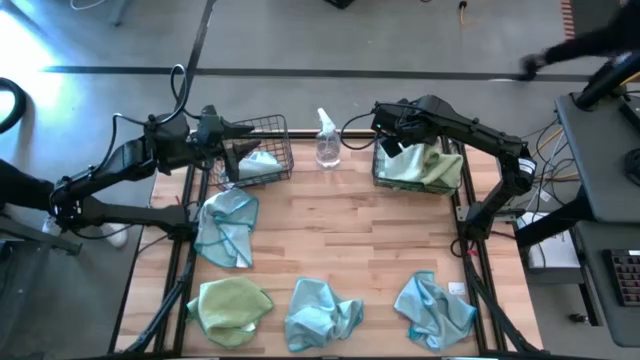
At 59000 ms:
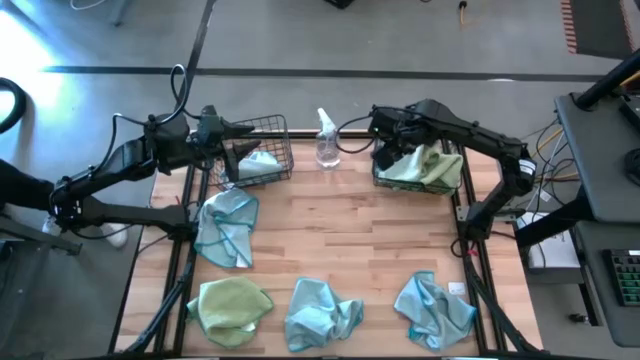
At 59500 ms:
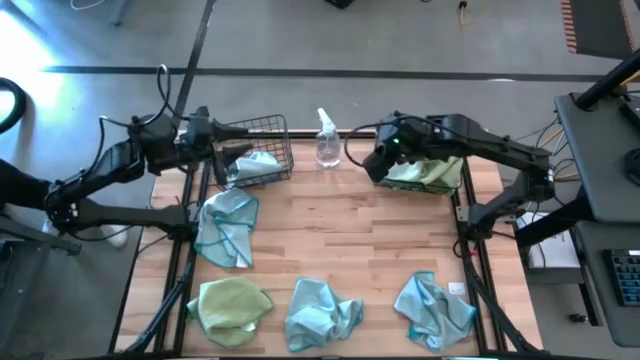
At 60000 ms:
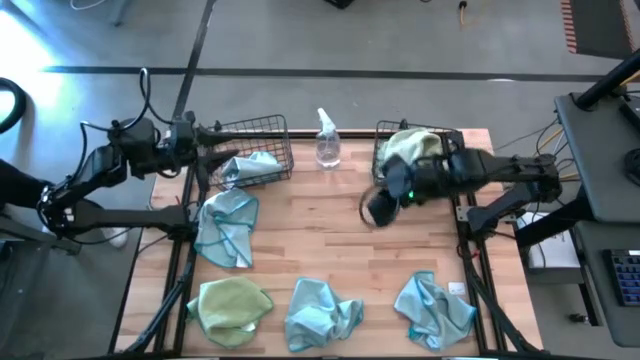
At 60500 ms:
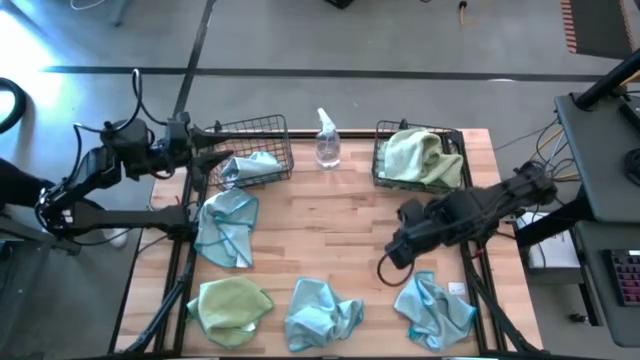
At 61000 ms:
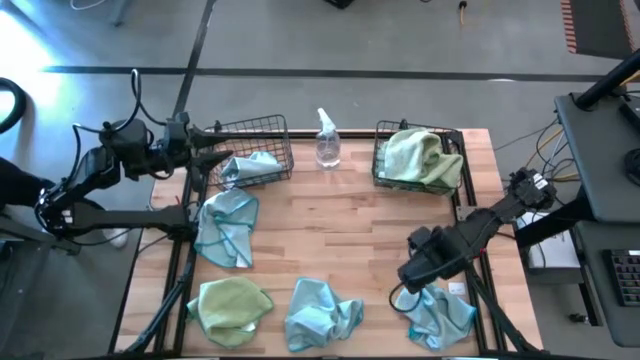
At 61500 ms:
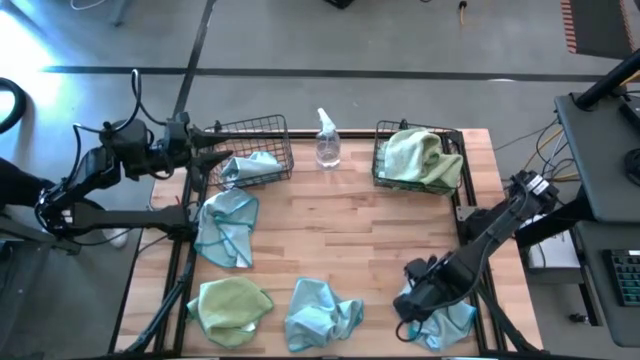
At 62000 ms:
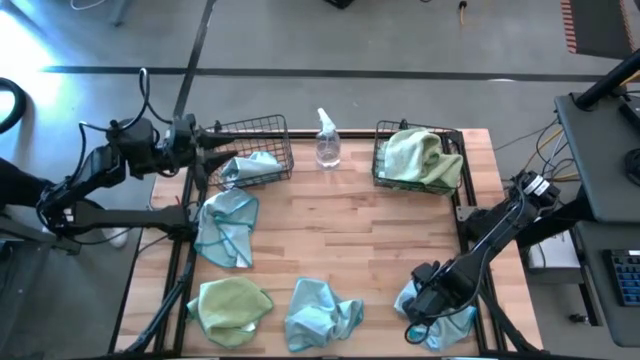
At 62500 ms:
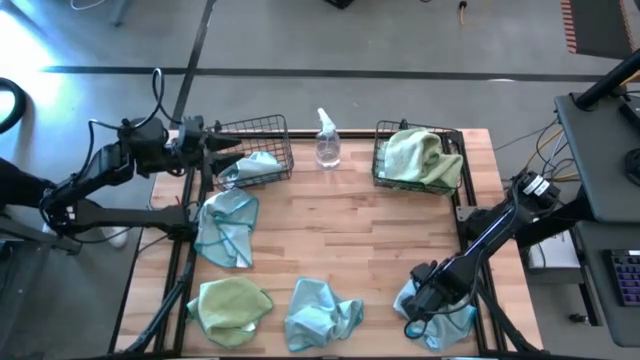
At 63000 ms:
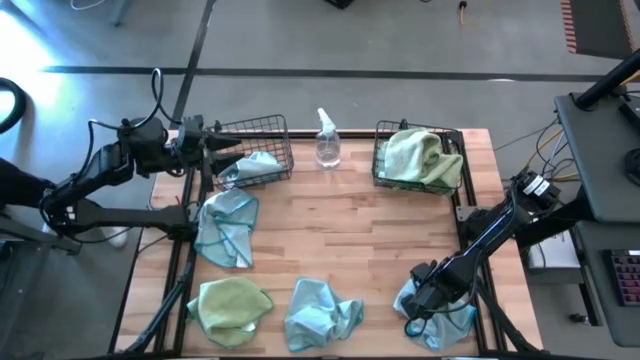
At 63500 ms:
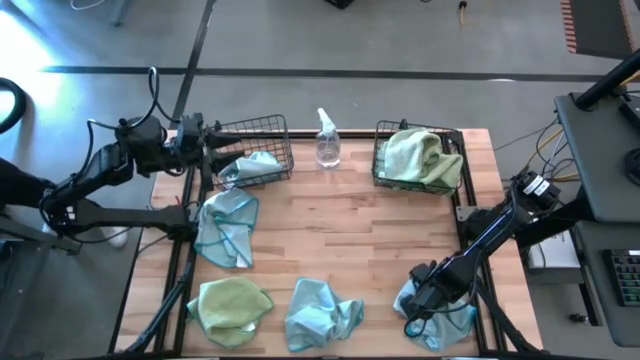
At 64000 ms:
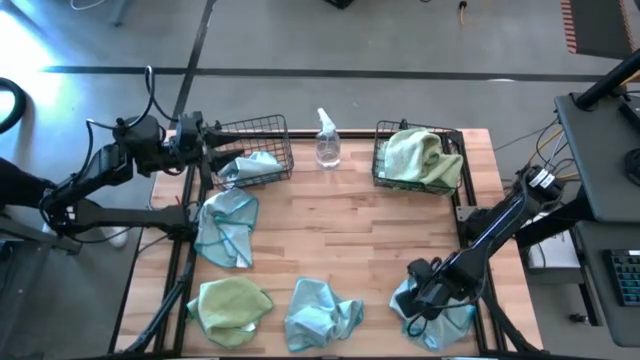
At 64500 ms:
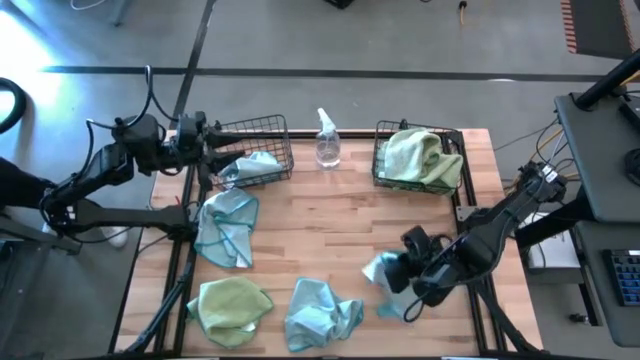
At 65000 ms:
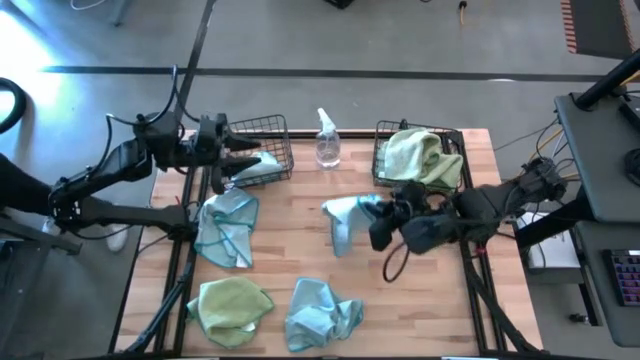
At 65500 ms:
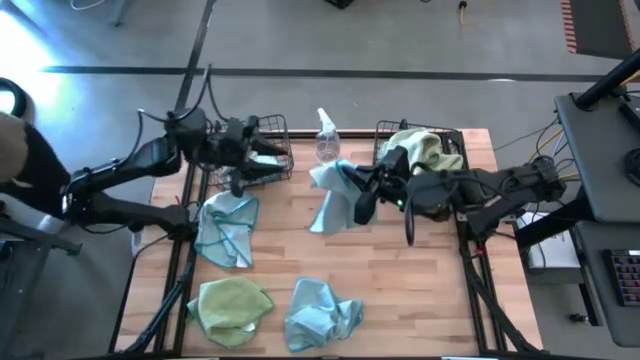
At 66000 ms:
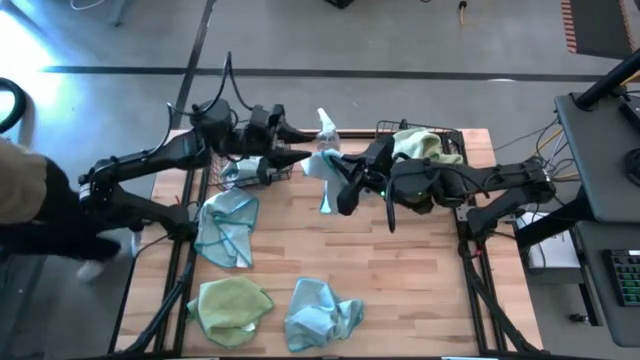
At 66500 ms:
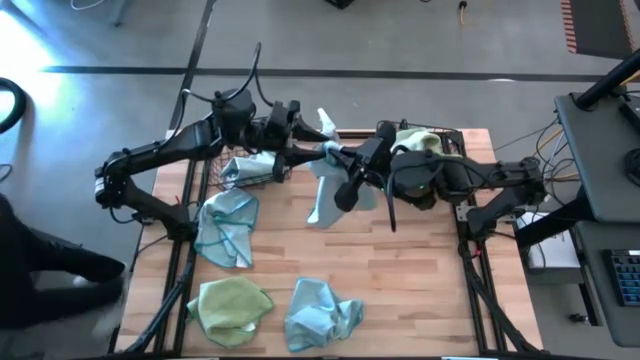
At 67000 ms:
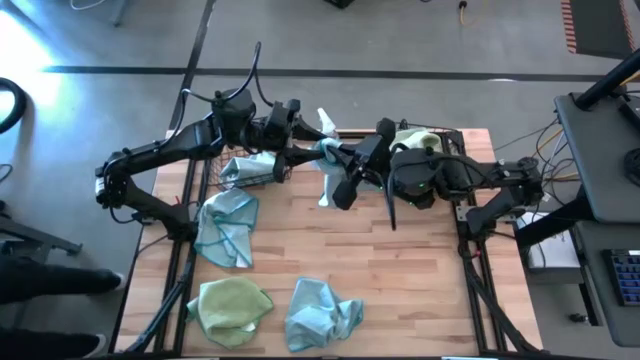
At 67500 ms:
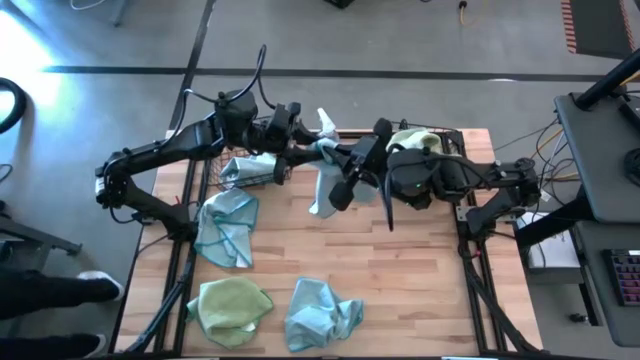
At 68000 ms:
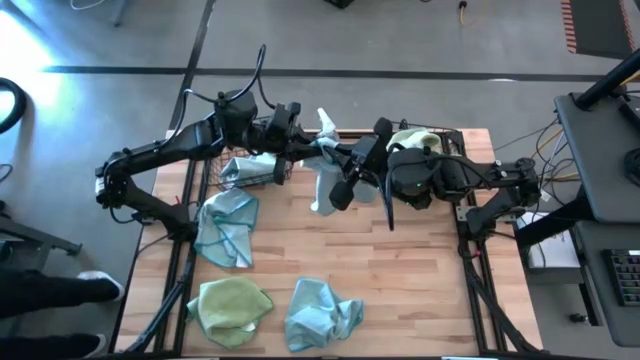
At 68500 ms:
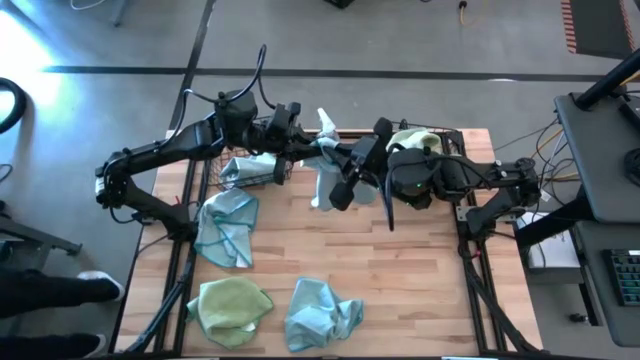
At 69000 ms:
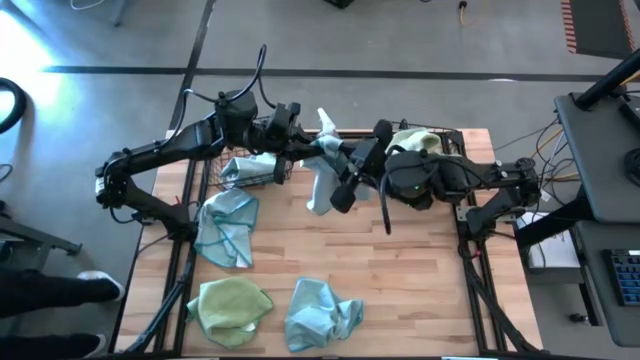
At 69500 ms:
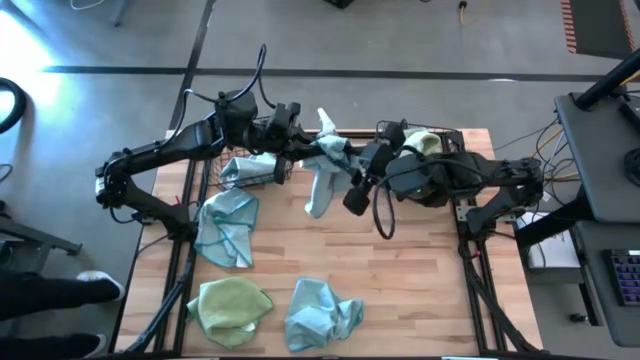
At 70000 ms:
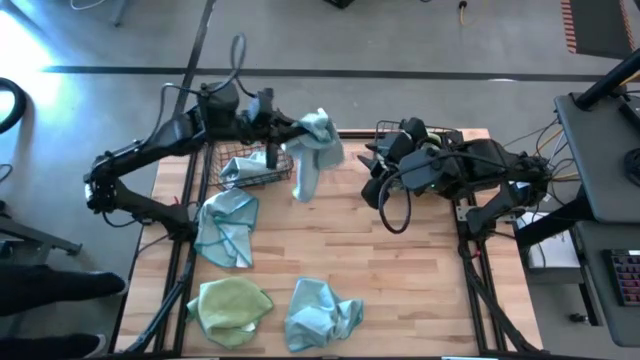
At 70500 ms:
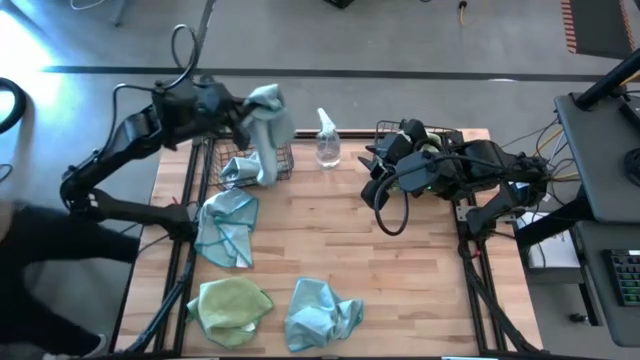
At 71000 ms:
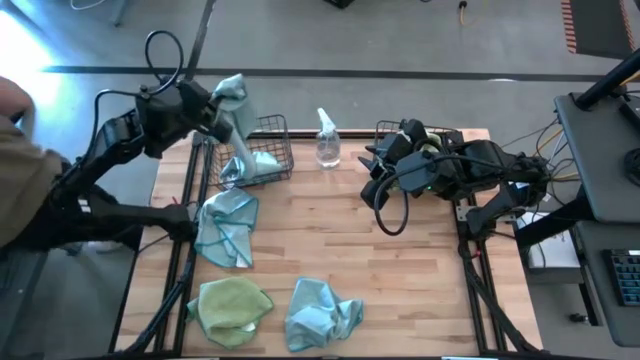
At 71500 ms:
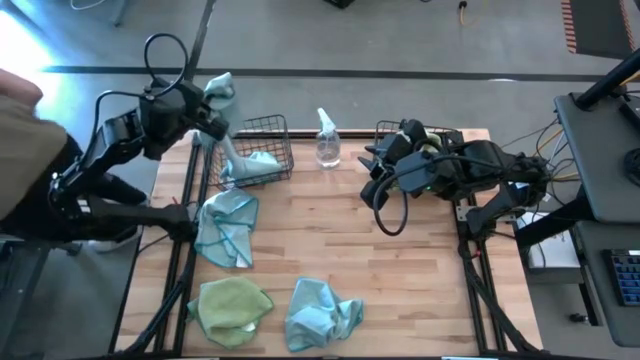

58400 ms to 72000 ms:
Task: Sort microfiber towel by color & place in baskets
Put the blue microfiber cloth into the left wire basket

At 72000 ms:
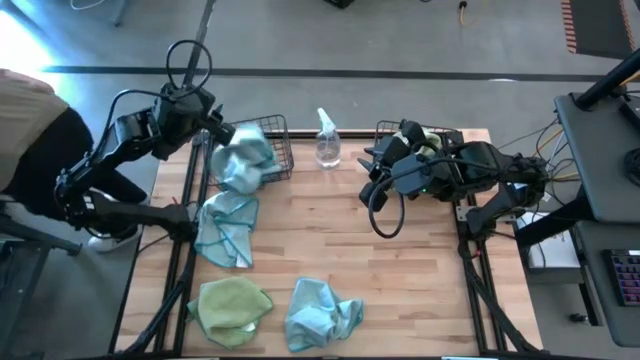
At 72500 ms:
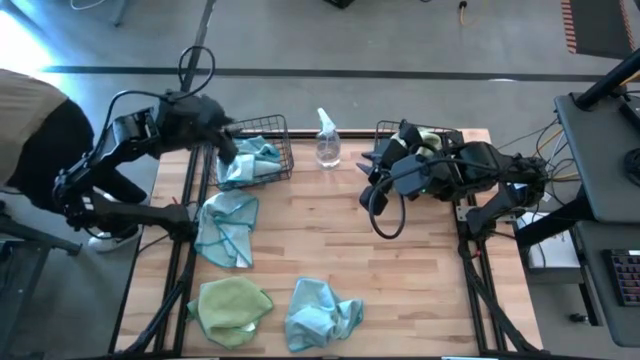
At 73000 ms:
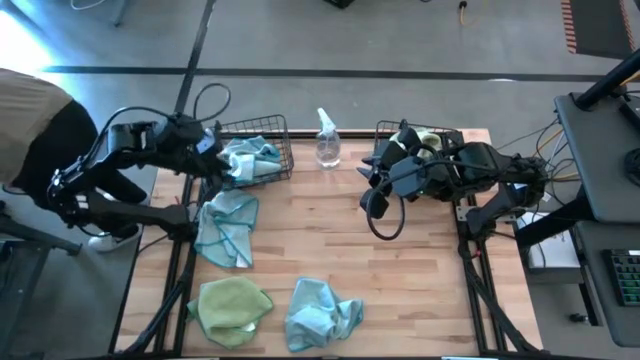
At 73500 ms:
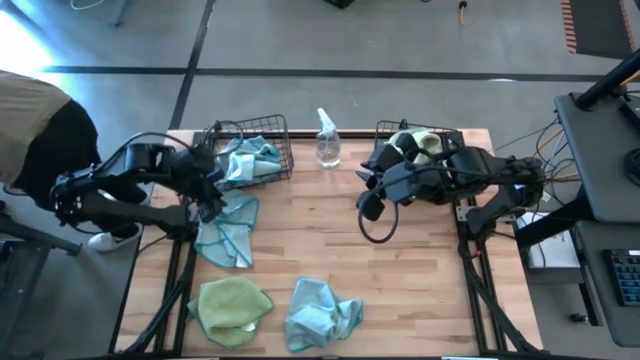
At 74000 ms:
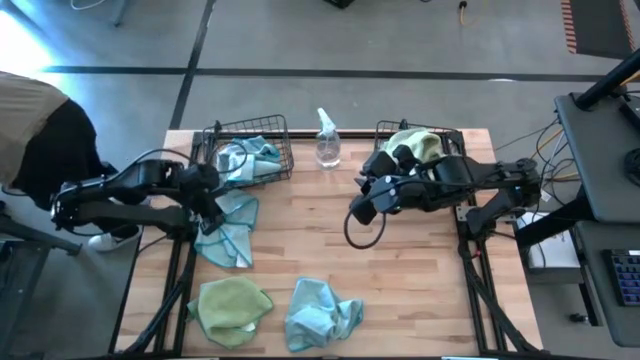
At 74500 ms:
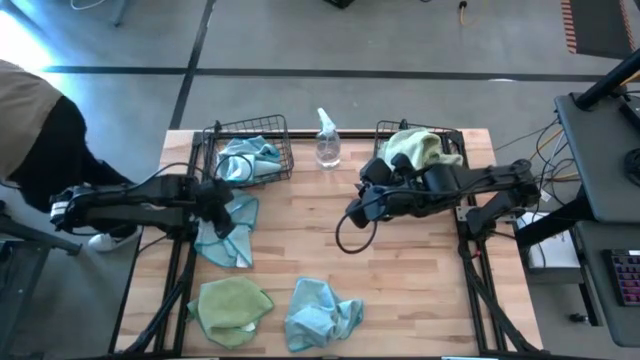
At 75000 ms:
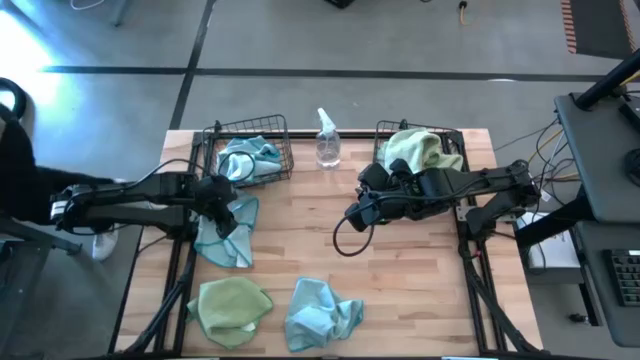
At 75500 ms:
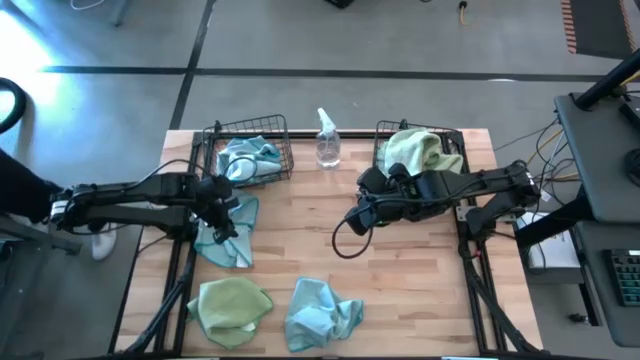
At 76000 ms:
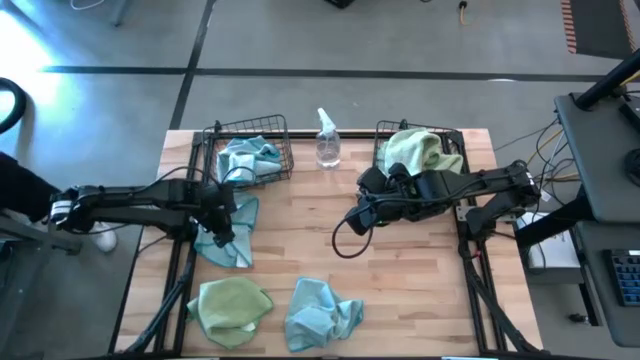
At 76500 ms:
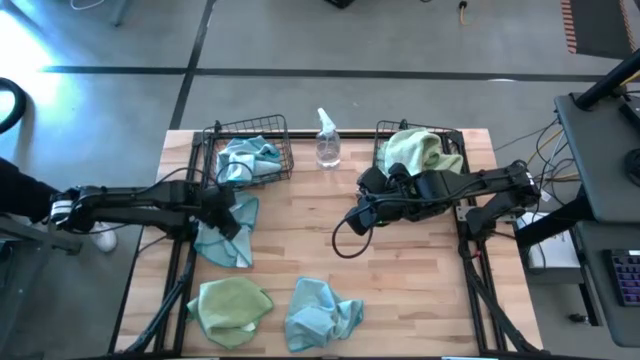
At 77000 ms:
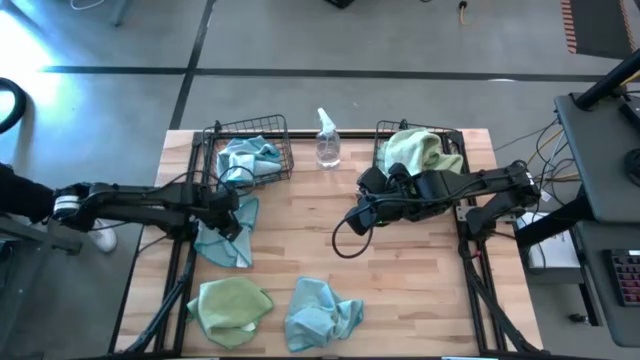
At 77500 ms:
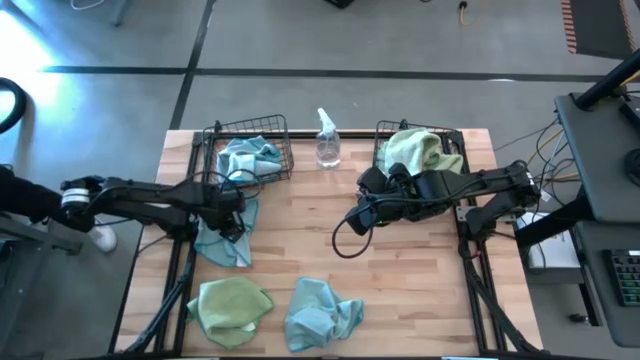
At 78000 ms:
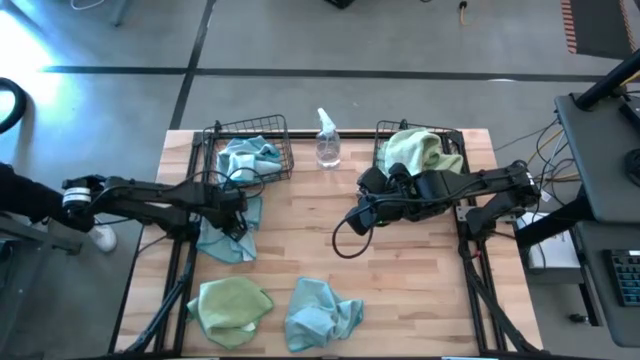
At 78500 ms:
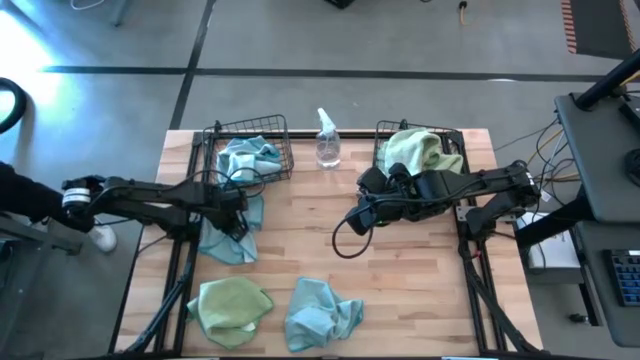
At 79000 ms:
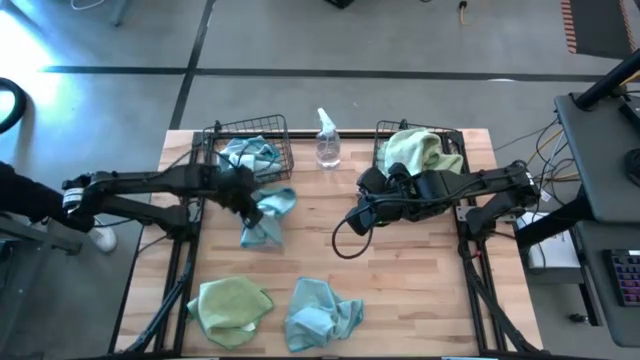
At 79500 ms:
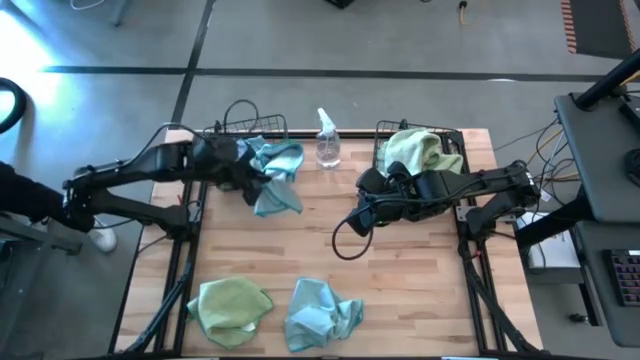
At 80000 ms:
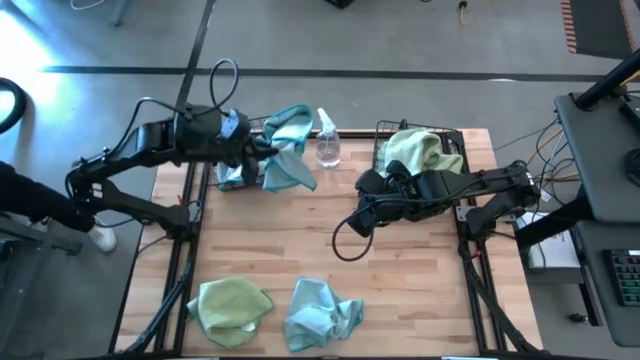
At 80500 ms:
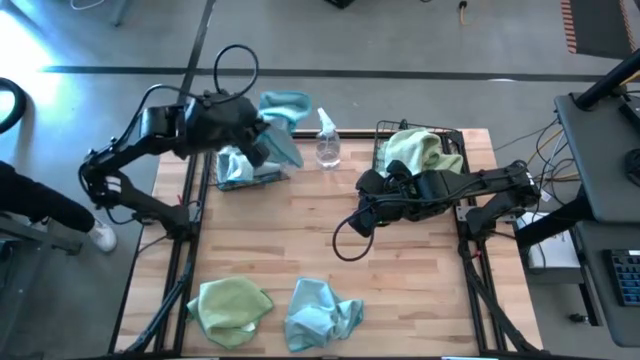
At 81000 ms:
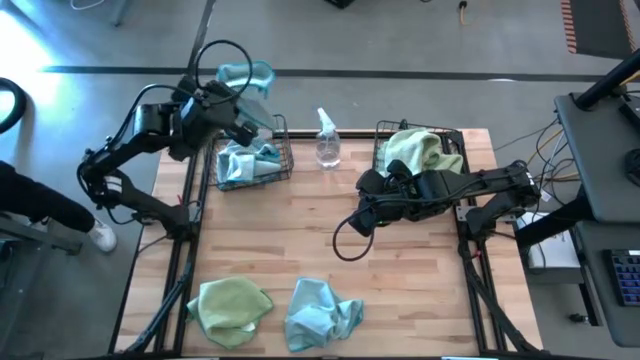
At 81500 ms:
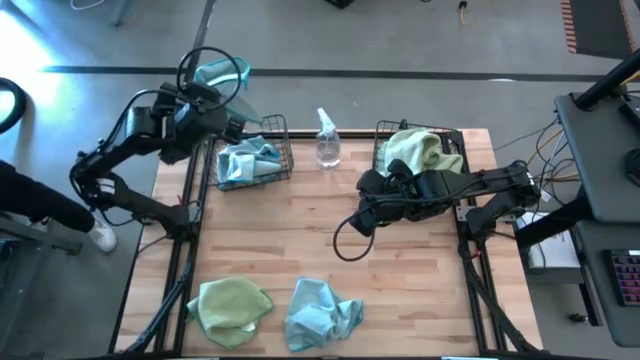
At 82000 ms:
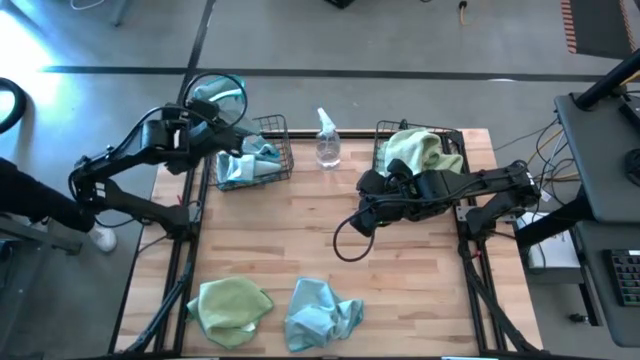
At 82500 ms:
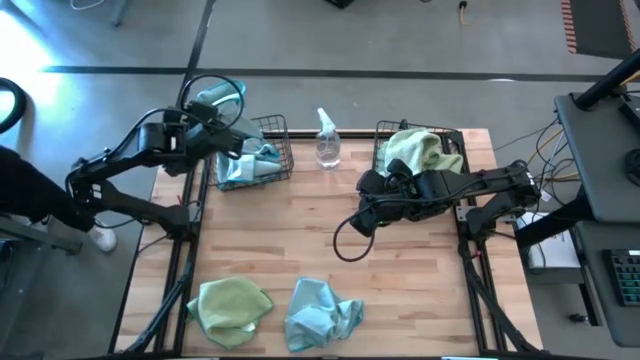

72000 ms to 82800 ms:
Put the blue microfiber cloth into the left wire basket
